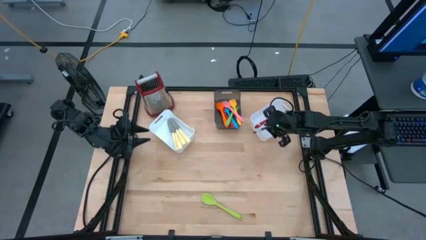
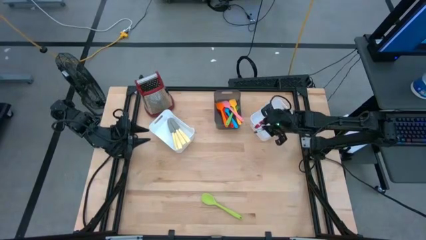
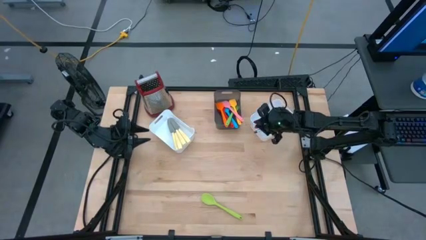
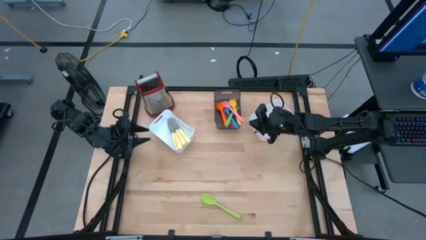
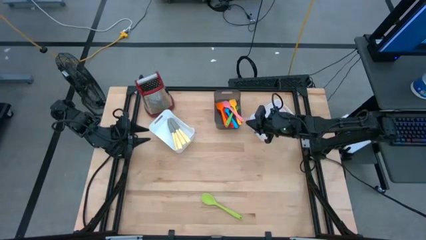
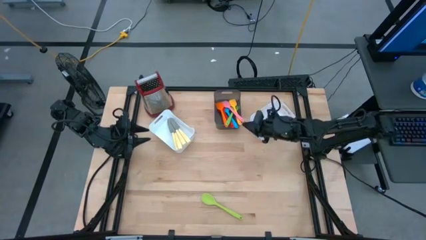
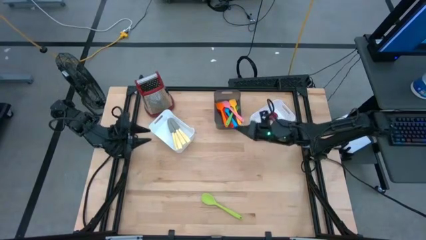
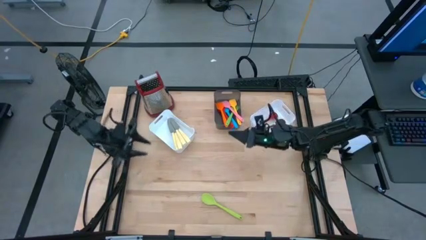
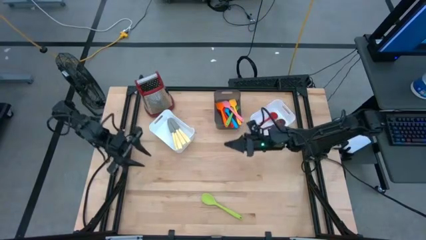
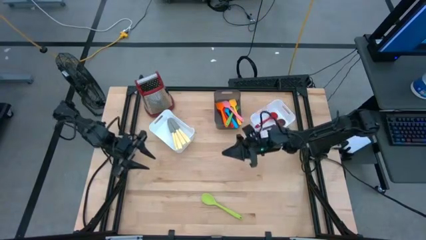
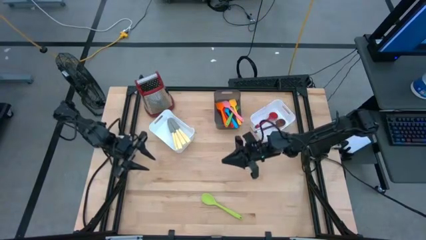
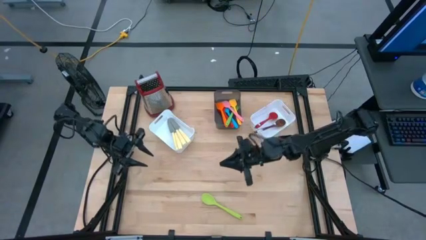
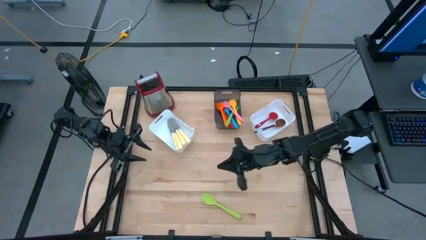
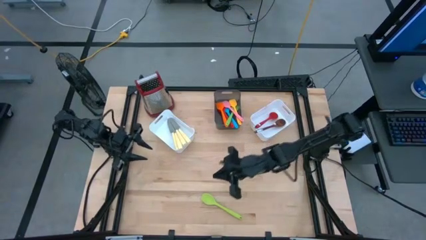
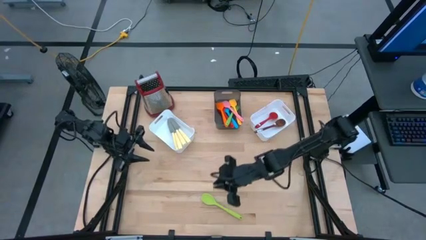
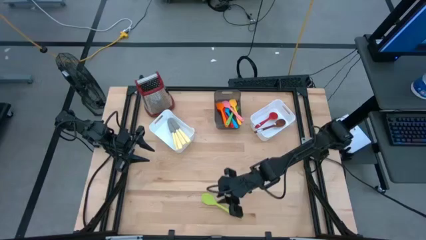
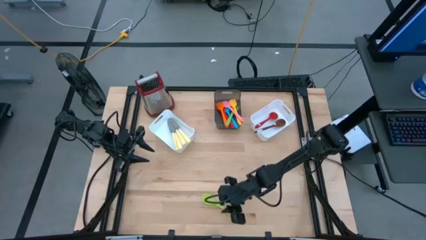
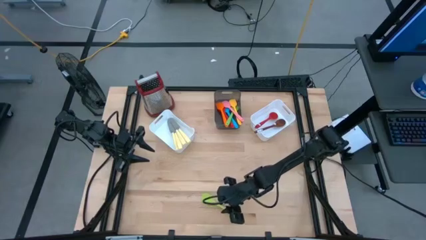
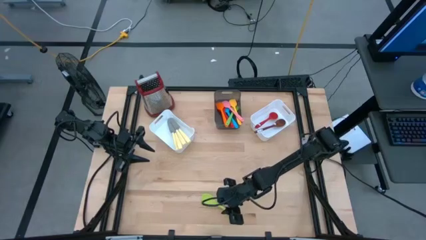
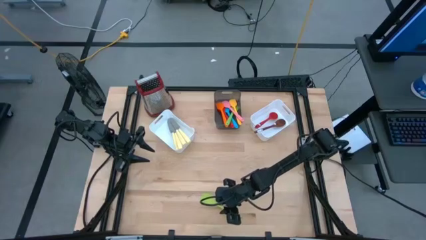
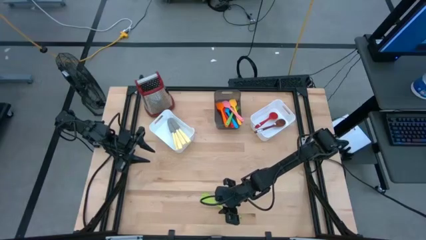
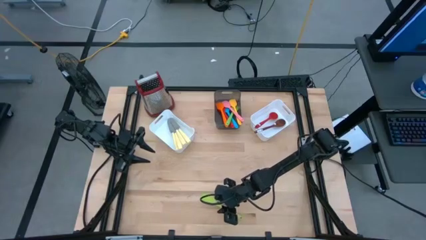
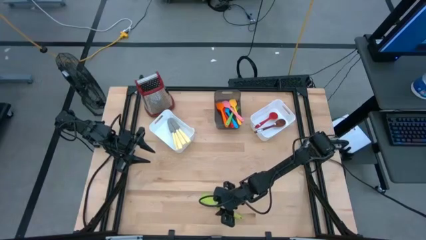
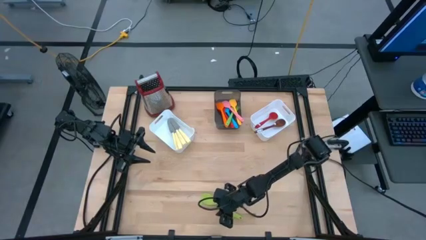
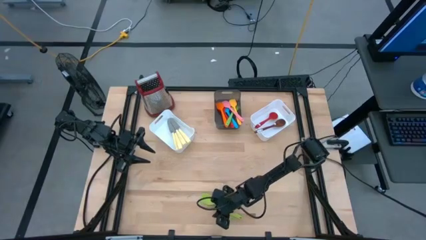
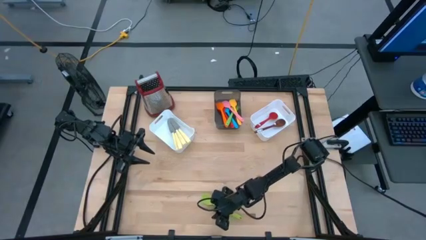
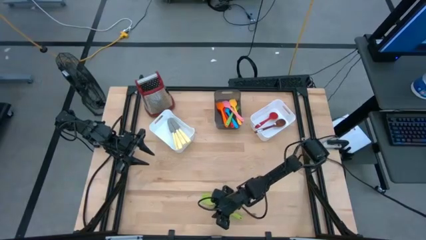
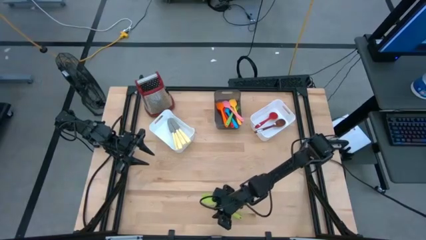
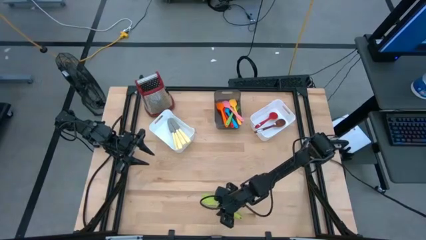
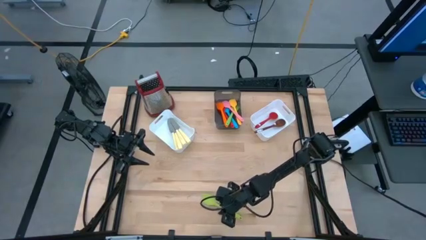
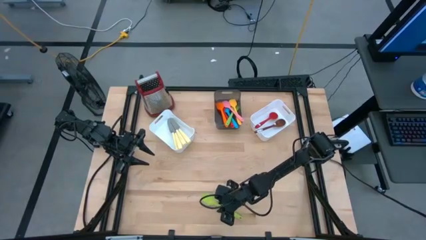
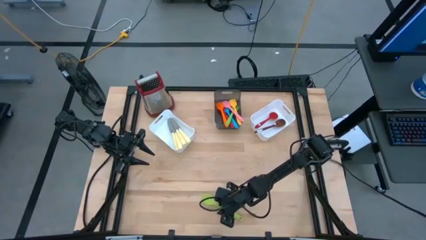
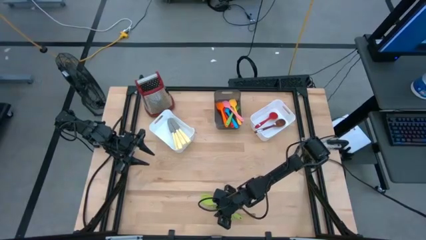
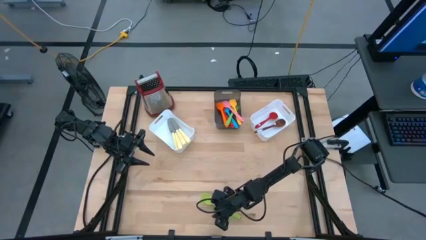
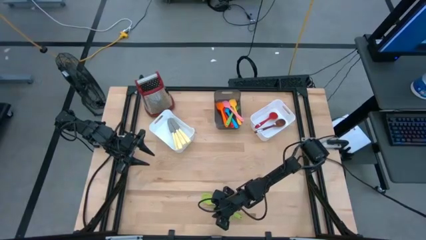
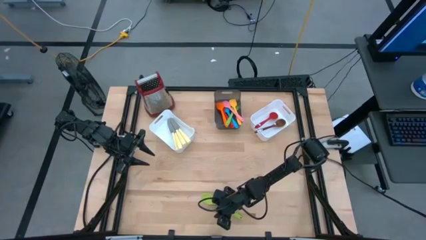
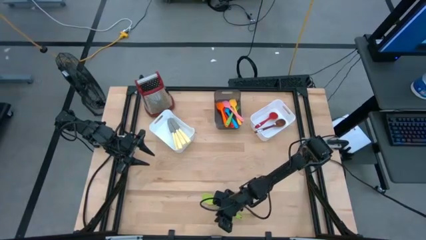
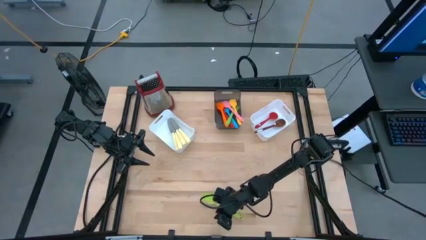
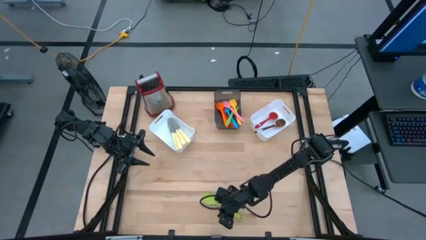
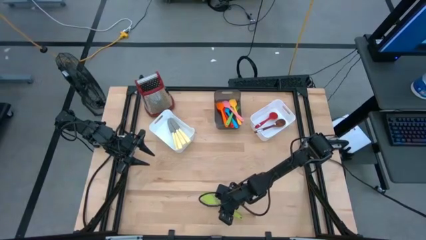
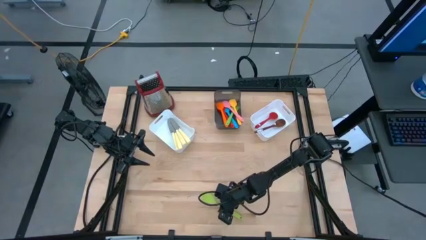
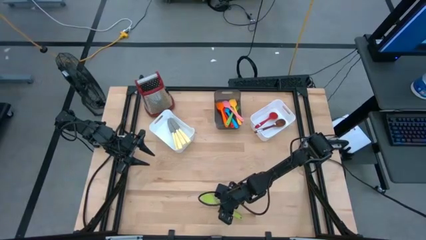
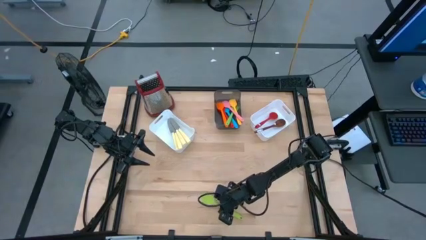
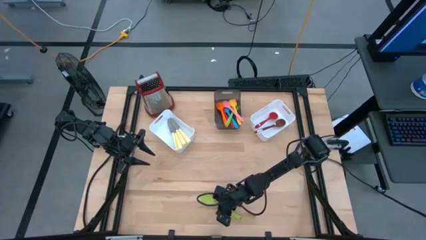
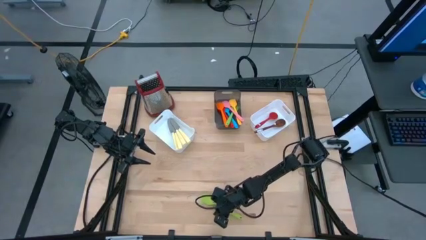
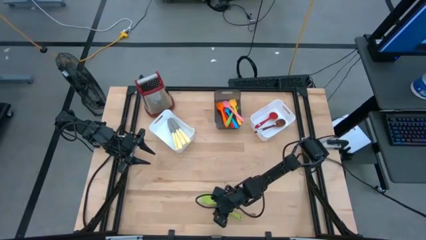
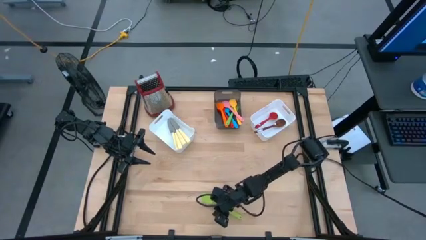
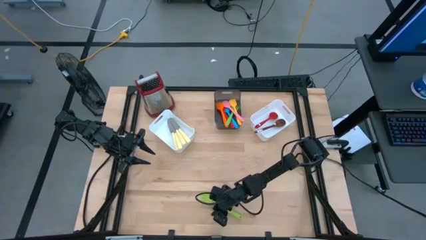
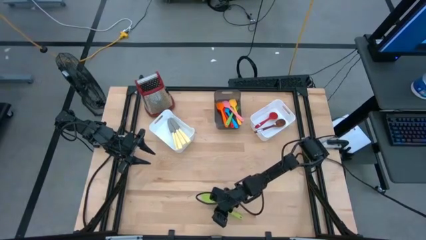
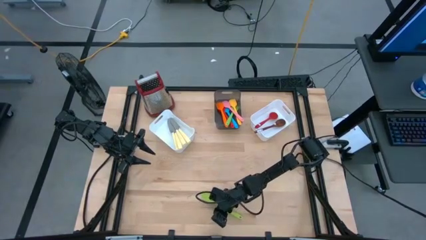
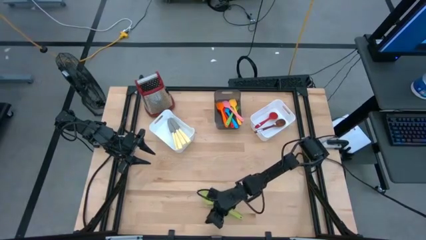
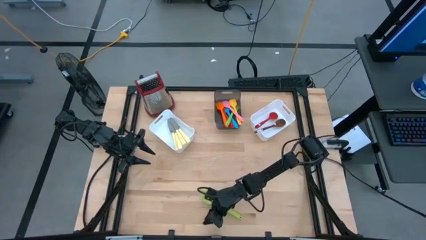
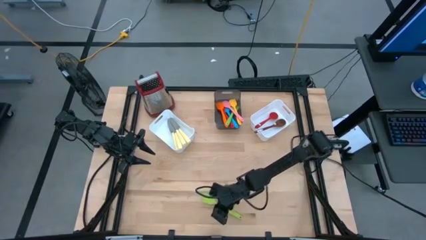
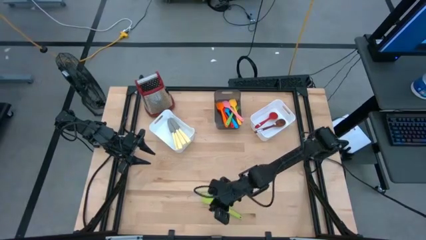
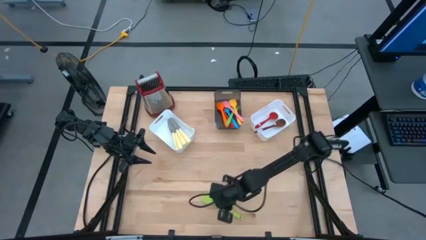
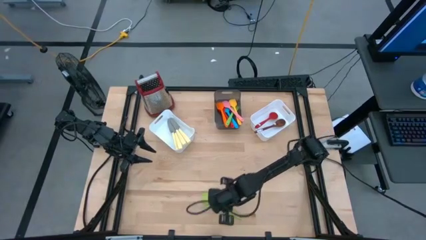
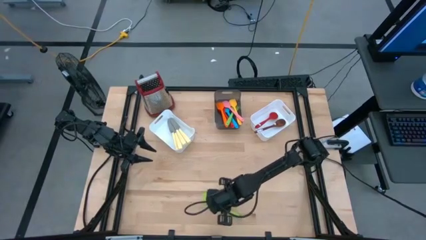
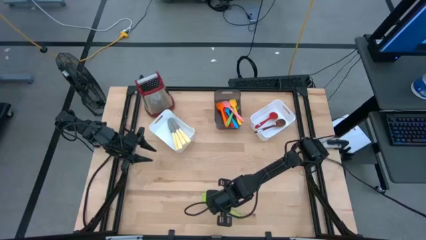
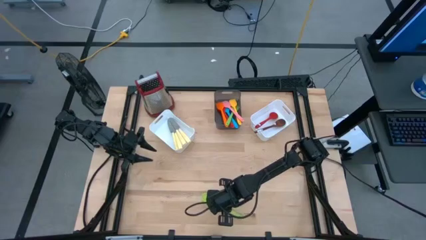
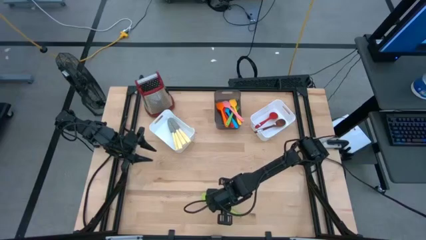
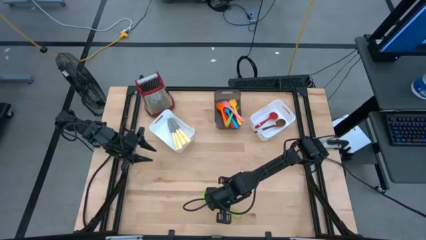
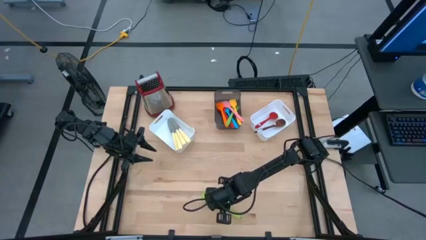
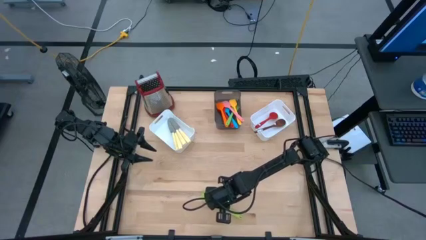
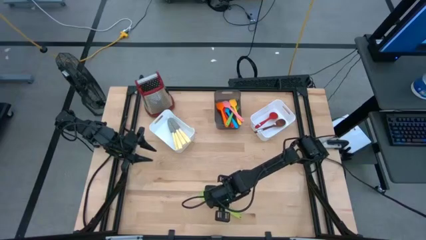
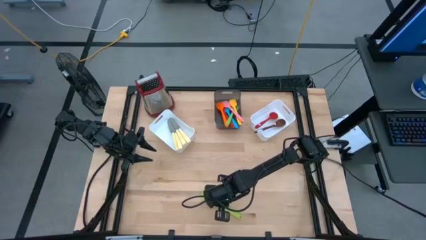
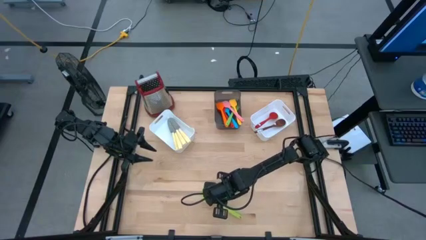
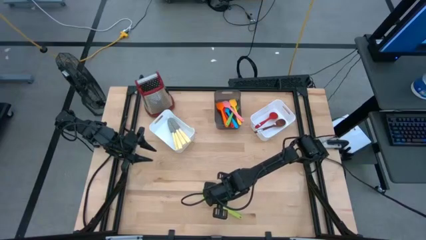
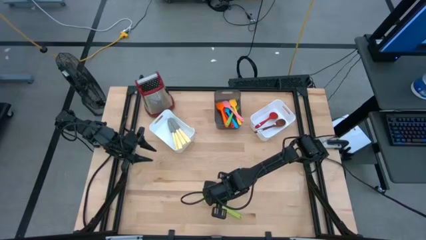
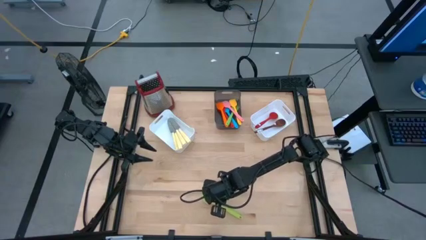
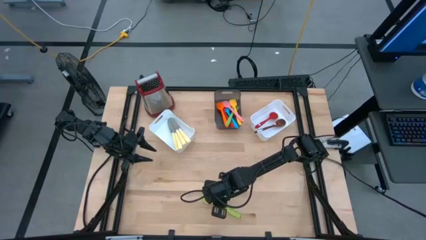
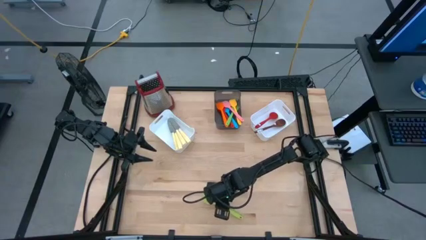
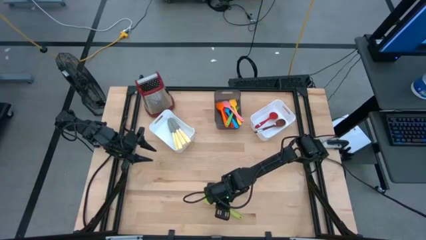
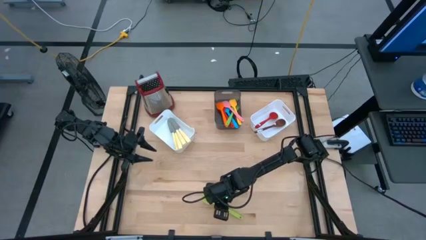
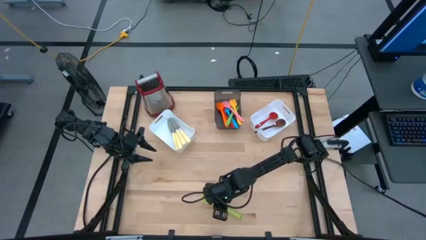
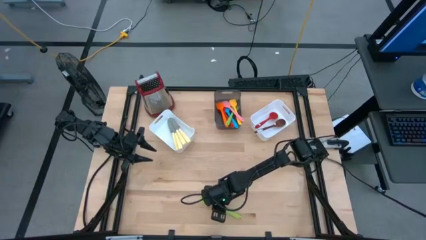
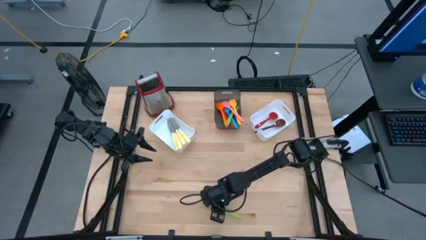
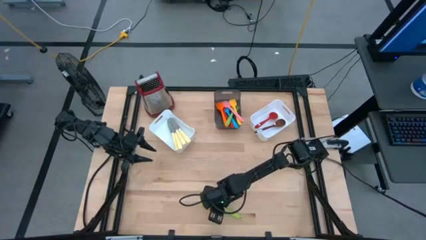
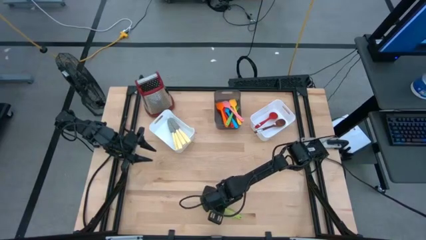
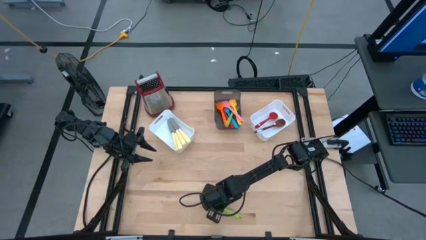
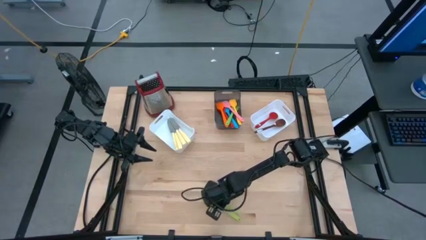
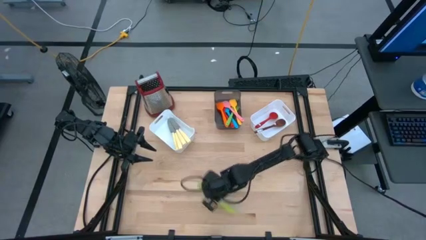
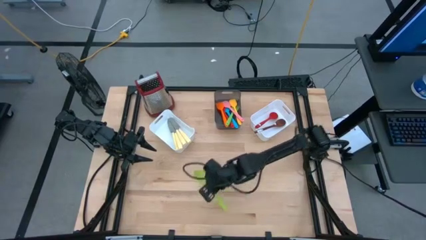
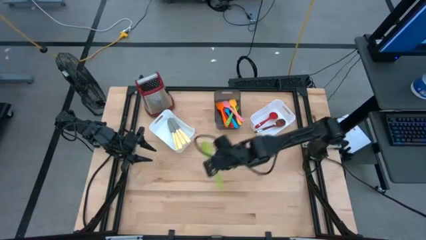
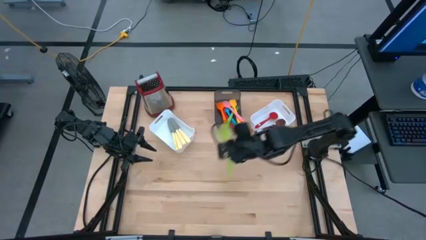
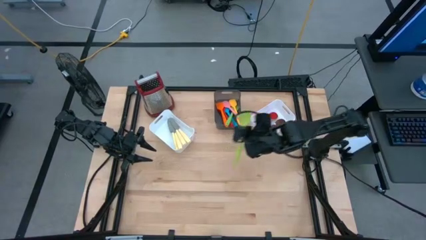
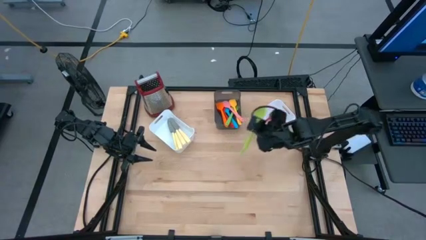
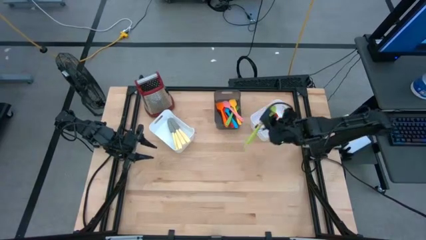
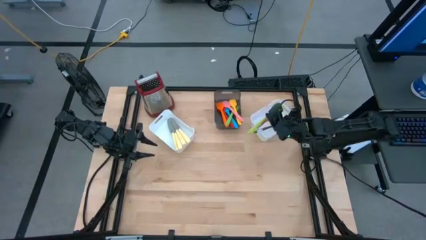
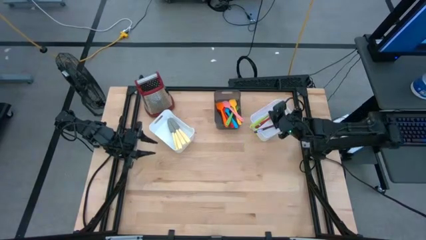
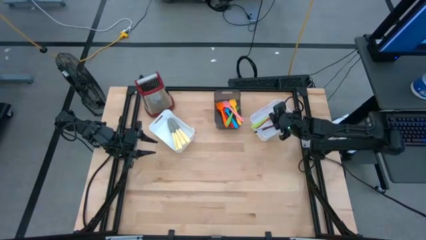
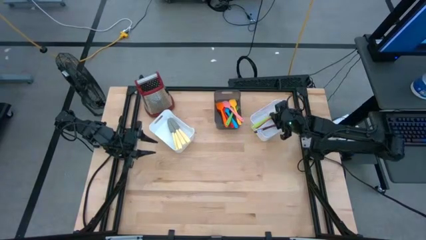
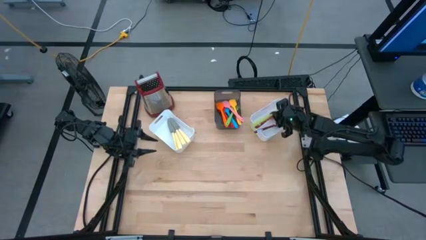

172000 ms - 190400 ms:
Task: Pick & Place Kitchen Items
Put the green serving spoon into the right white bin
